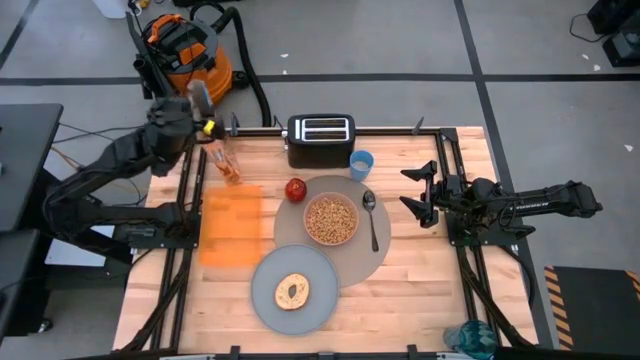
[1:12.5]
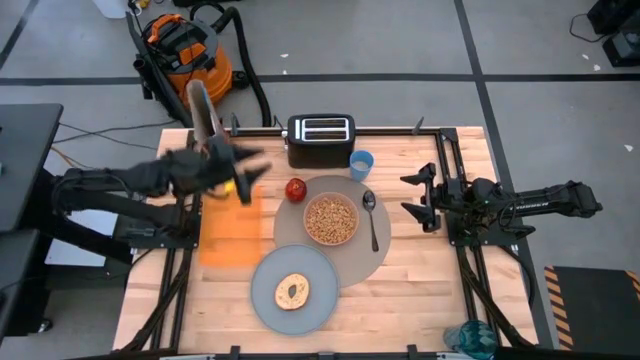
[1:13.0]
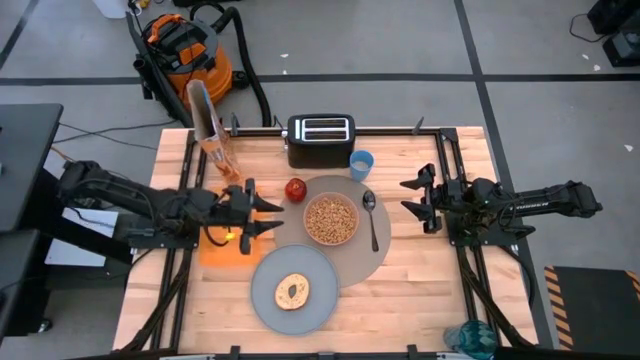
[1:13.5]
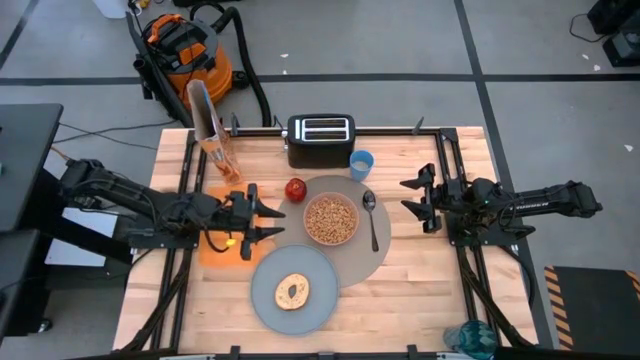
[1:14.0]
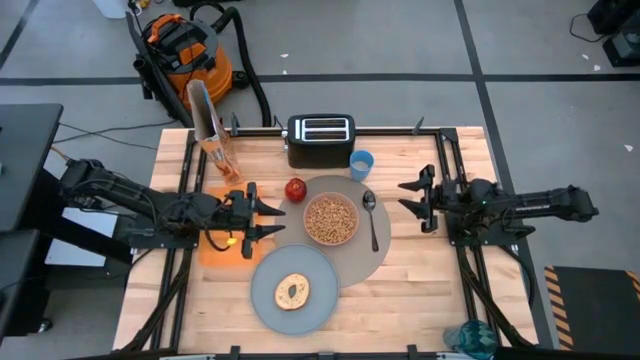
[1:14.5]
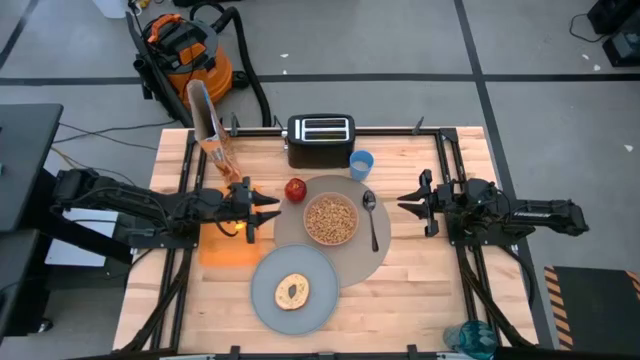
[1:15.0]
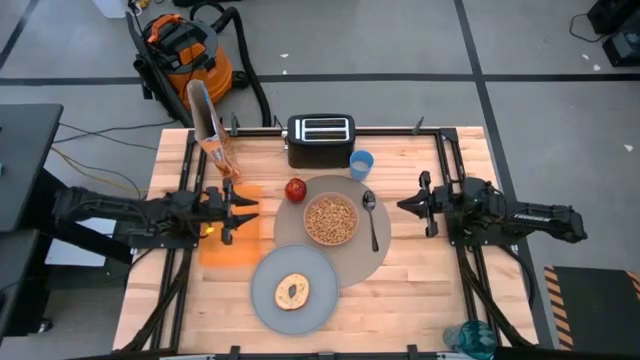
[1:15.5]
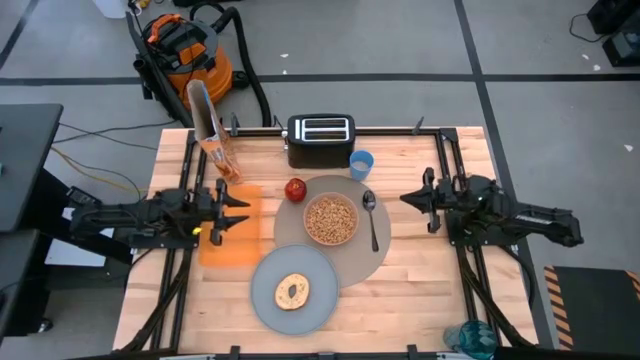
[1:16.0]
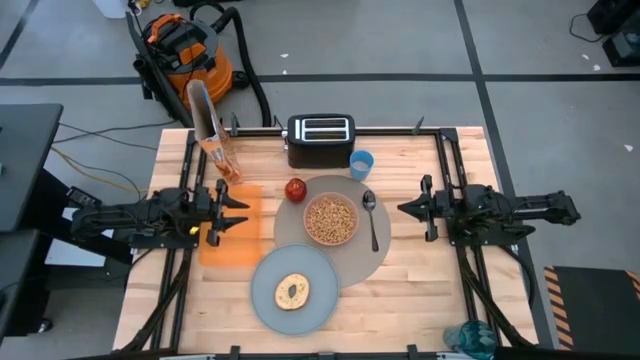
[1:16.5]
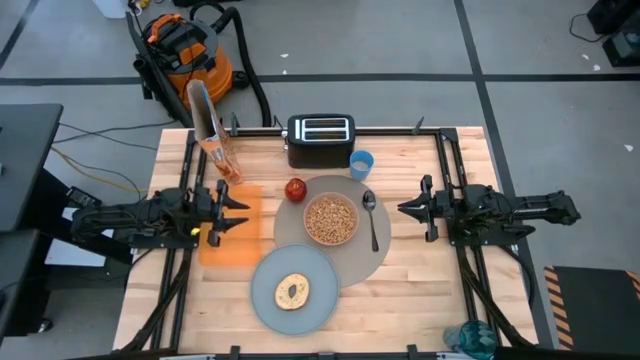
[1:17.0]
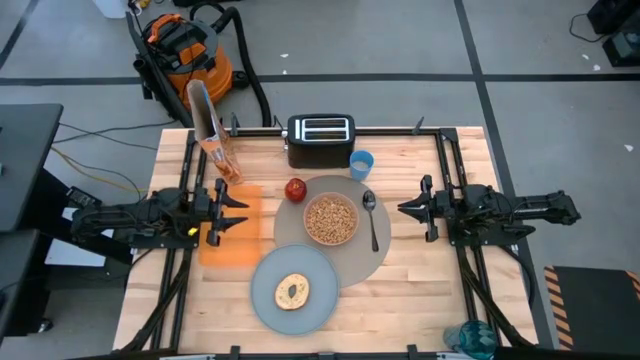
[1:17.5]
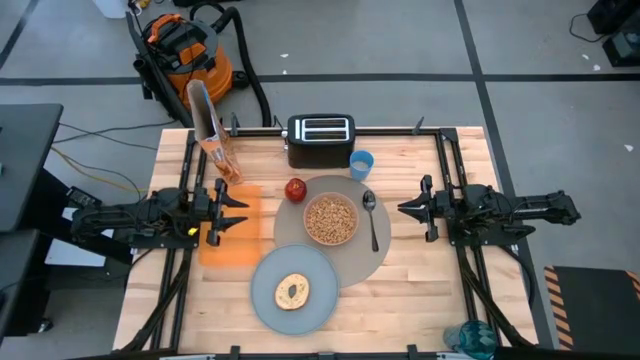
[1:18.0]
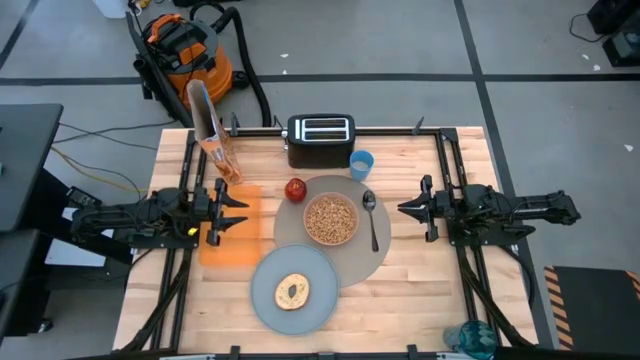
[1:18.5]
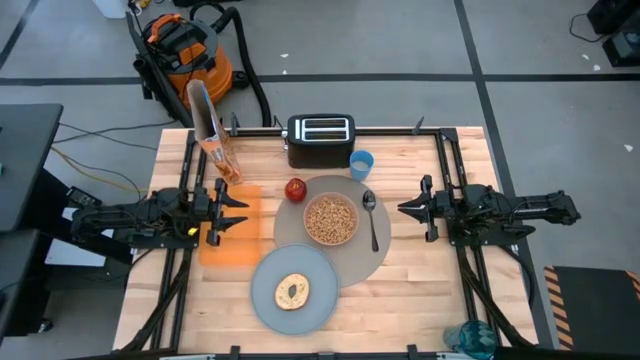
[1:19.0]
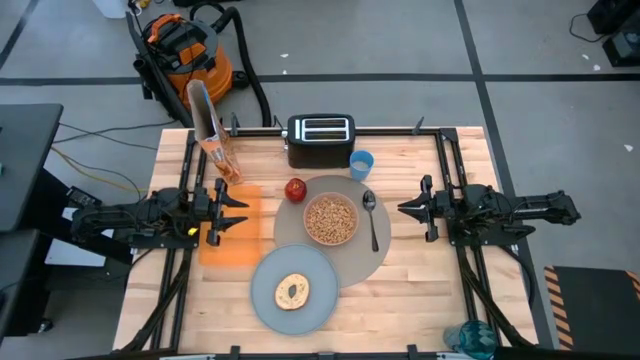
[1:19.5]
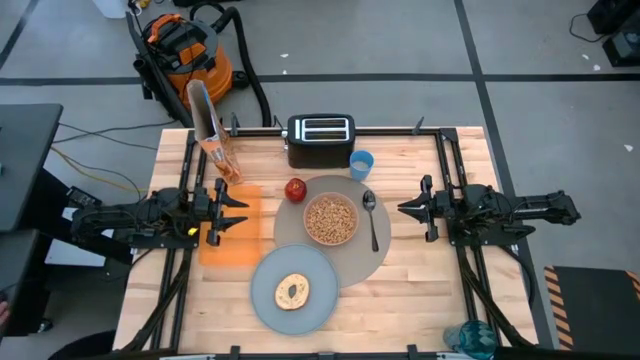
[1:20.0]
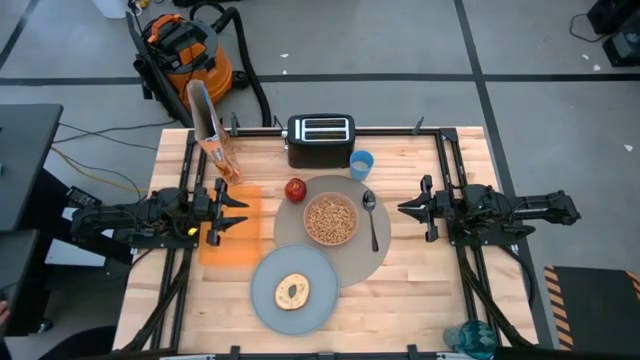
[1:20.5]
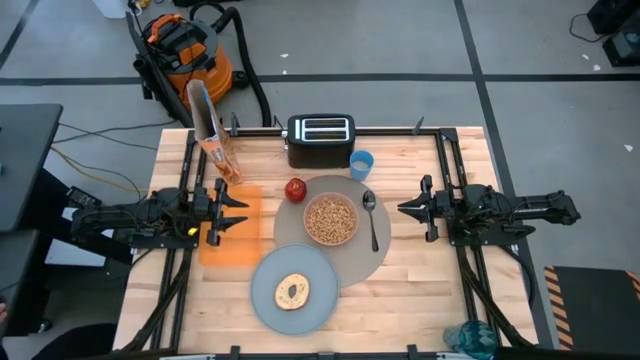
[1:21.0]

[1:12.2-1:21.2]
Task: Arrange a breakfast setting
Return to Home Position

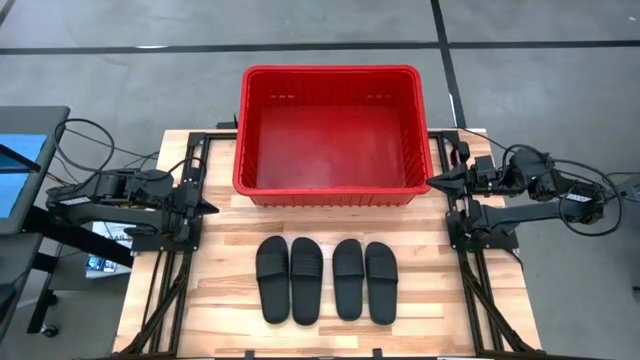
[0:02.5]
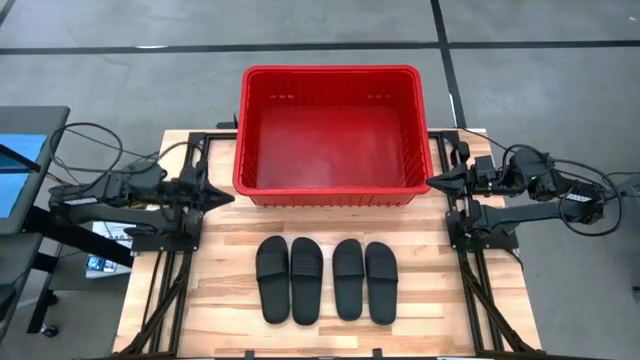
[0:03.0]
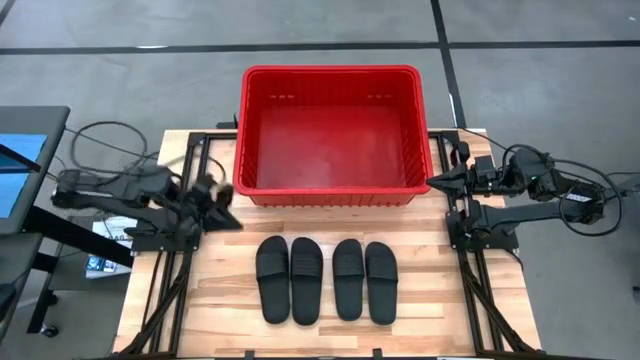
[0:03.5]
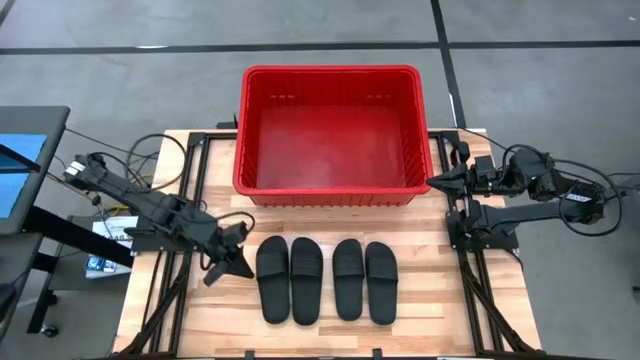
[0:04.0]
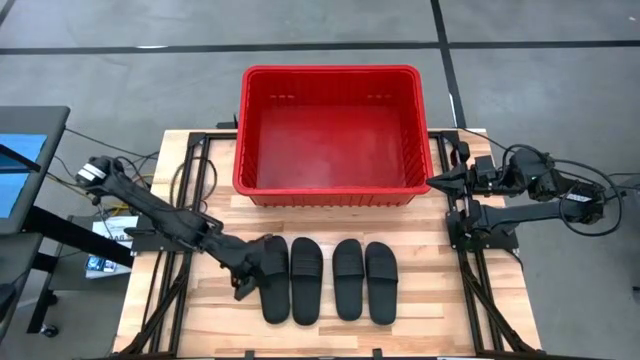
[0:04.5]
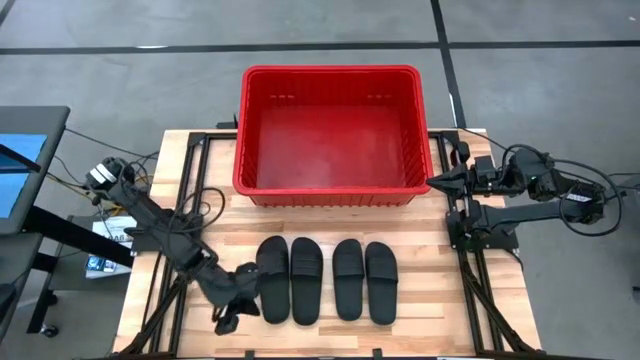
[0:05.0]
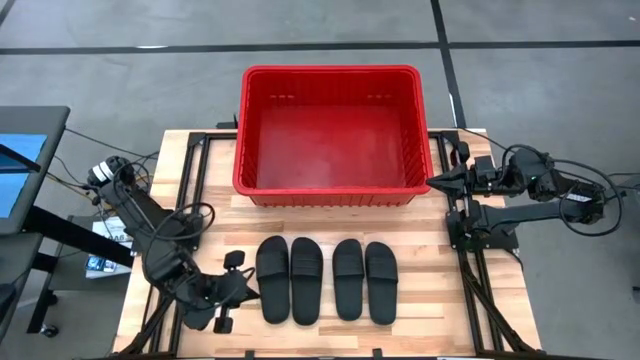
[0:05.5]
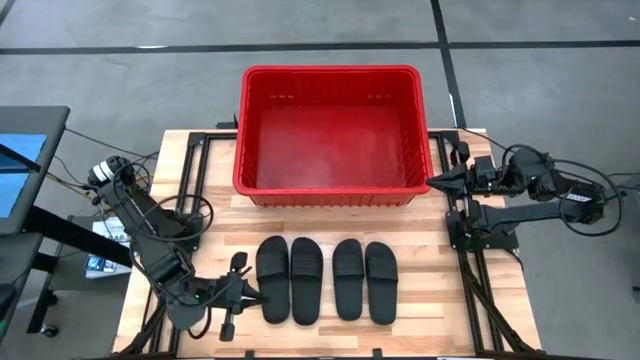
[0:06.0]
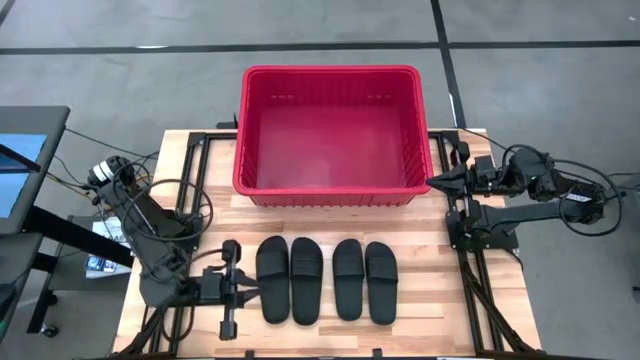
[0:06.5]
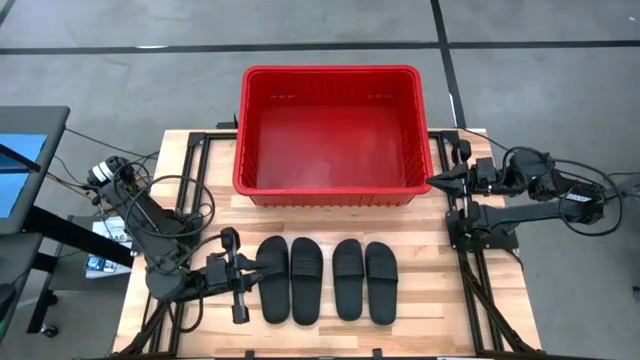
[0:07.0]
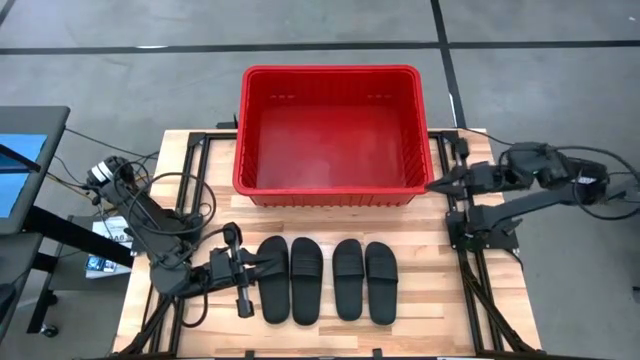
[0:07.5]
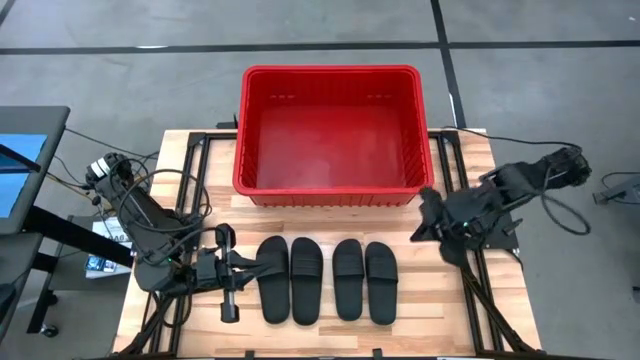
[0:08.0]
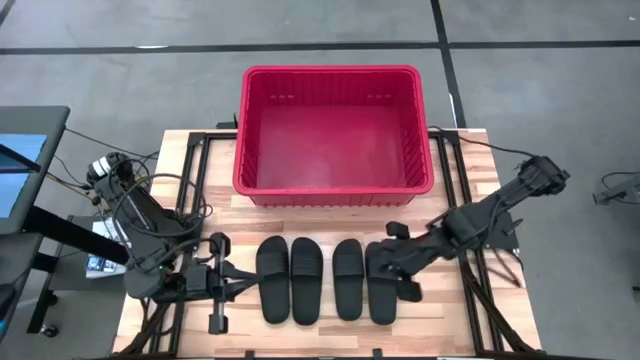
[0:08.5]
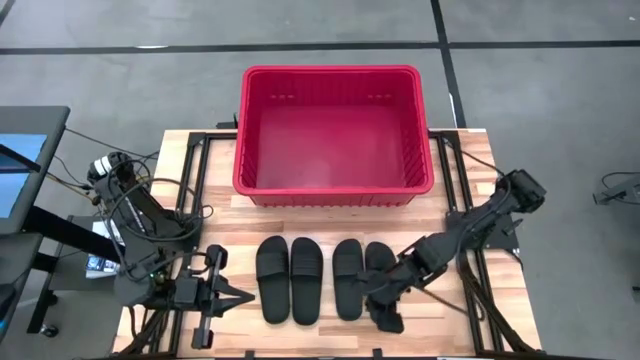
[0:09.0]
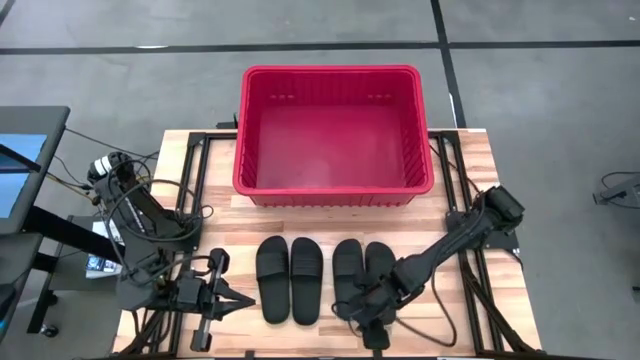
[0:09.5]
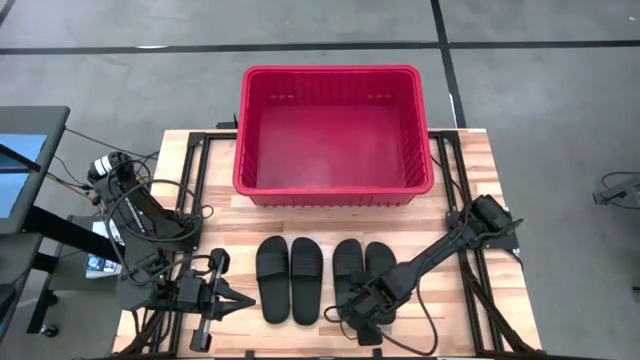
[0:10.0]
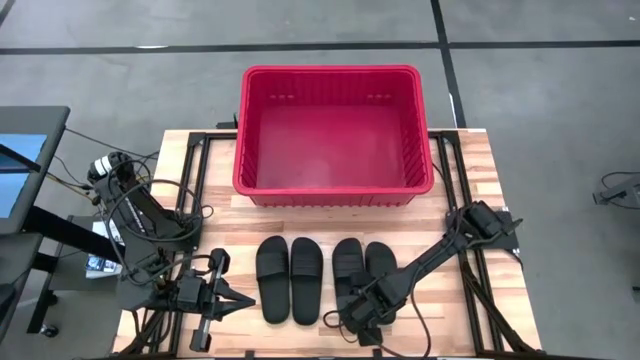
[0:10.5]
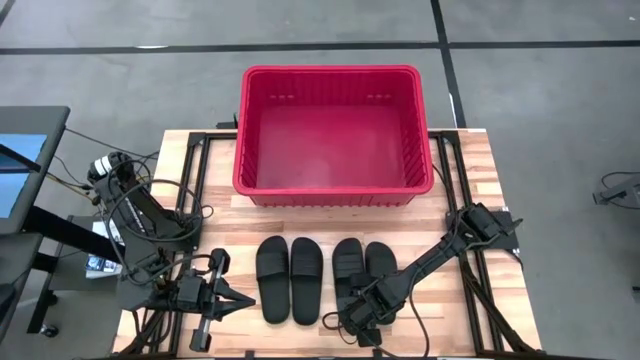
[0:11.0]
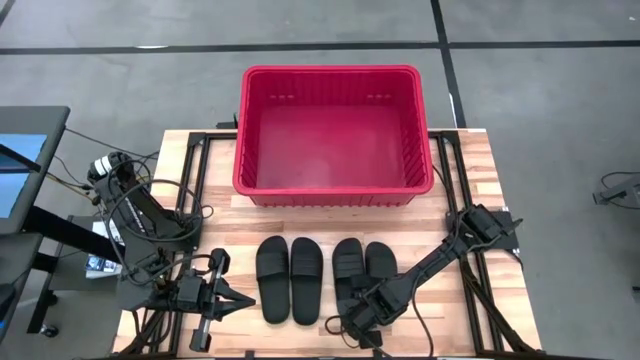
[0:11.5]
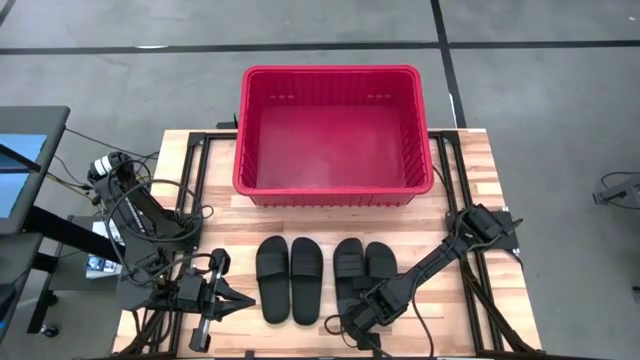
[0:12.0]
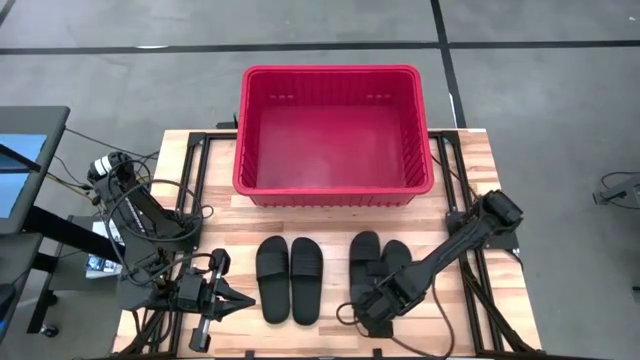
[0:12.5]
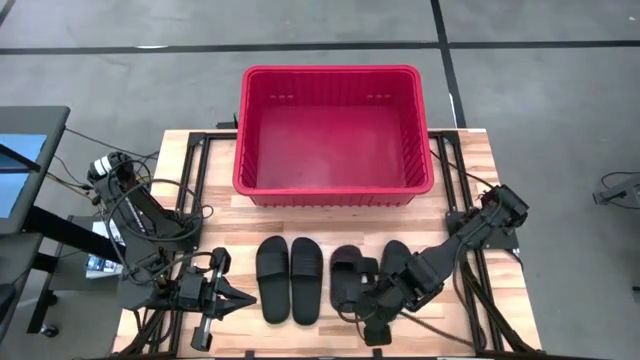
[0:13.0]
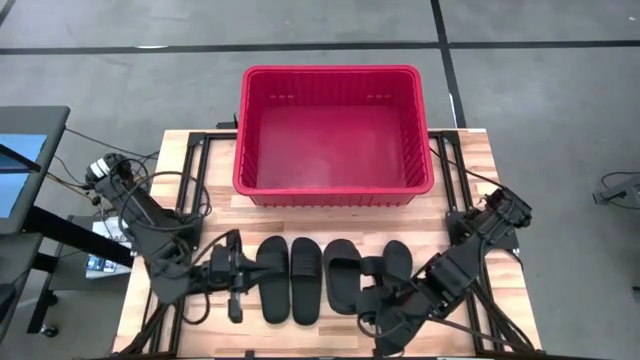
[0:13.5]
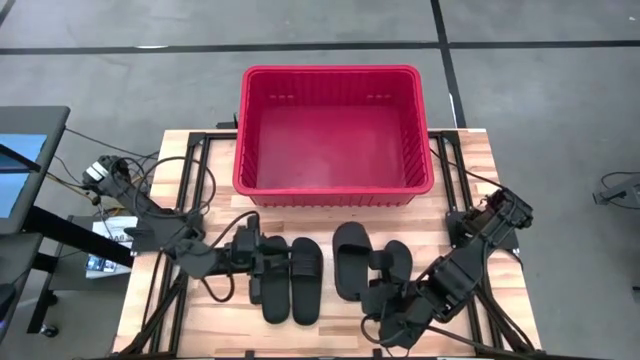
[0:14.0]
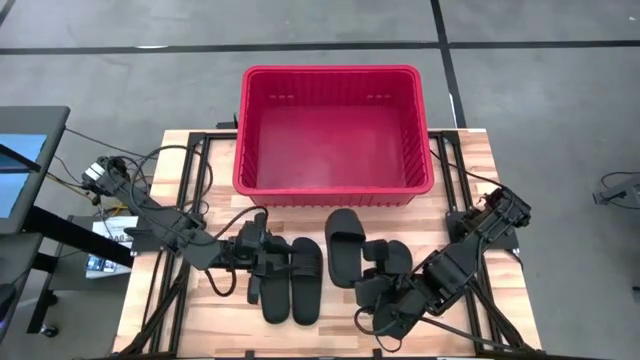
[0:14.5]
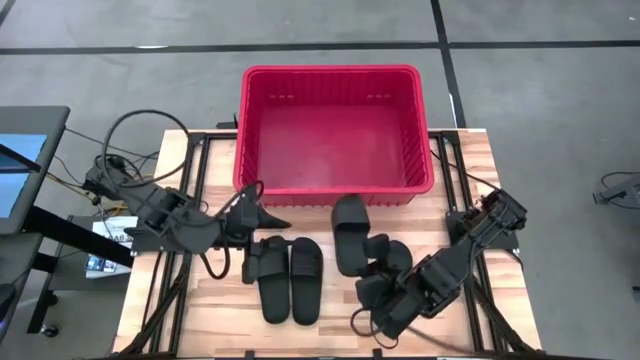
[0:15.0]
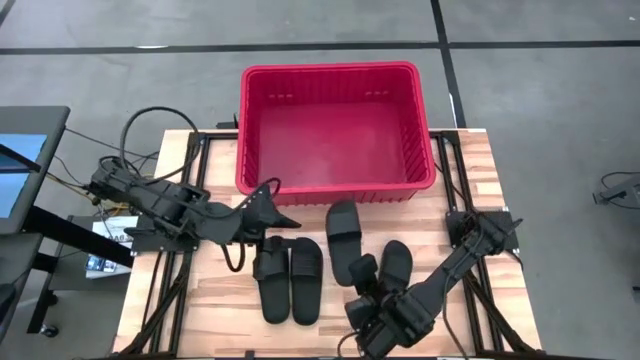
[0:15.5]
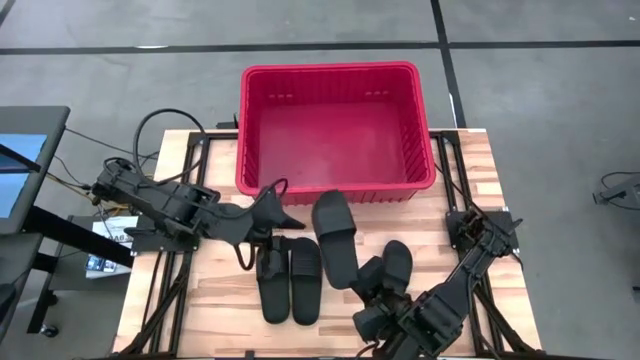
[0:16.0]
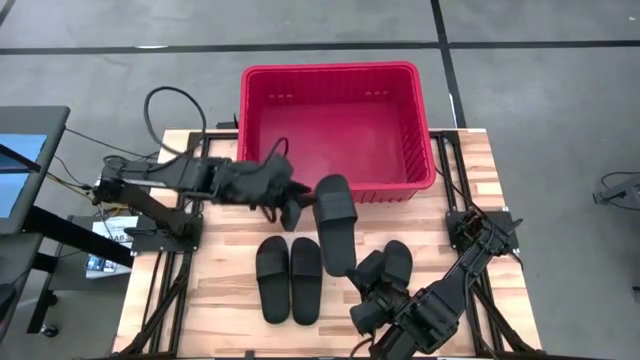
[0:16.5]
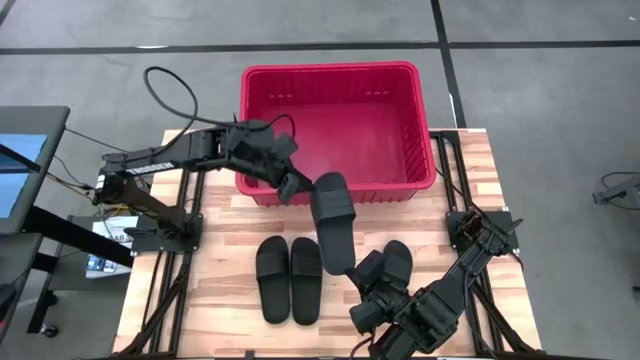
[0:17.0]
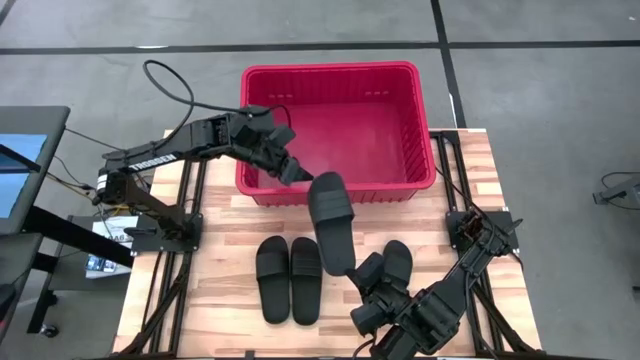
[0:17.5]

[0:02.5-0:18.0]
Task: Pick and place slides into bin
Put the black slide into the red organizer bin
